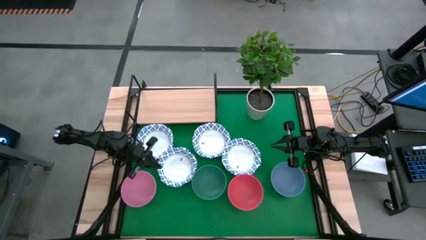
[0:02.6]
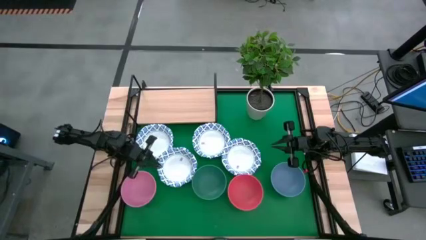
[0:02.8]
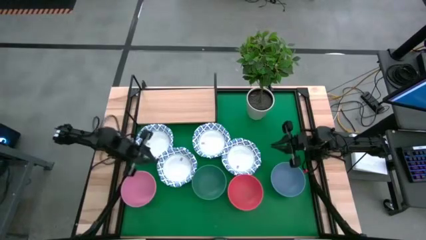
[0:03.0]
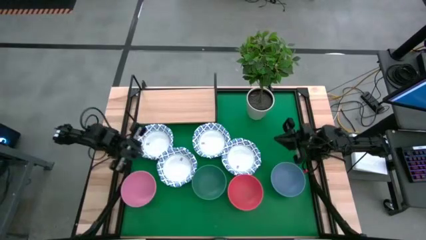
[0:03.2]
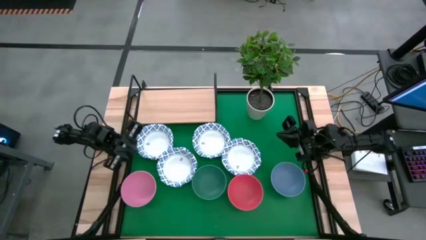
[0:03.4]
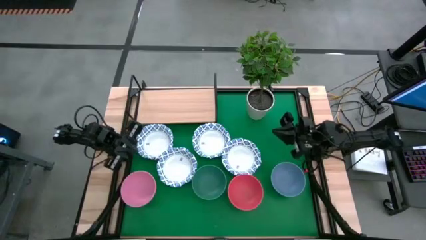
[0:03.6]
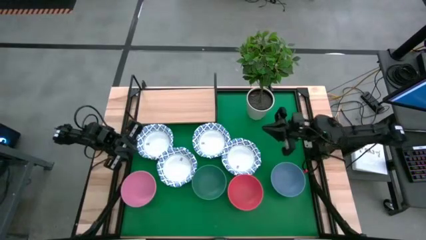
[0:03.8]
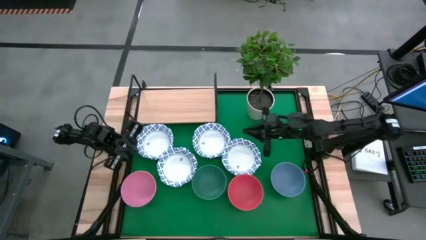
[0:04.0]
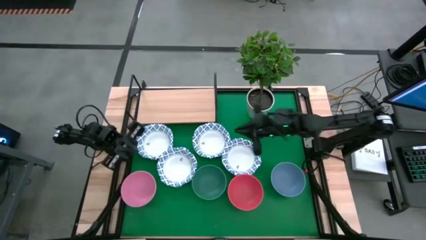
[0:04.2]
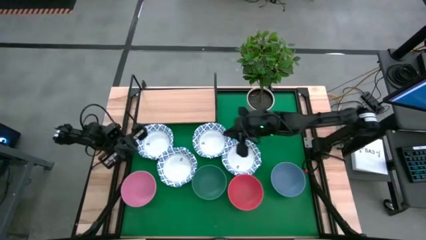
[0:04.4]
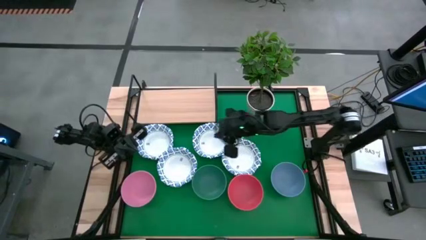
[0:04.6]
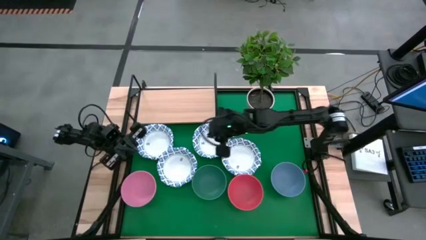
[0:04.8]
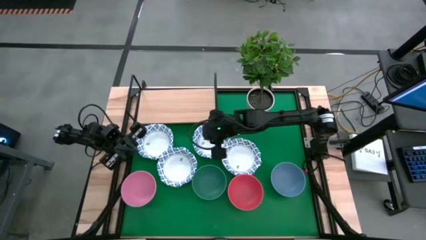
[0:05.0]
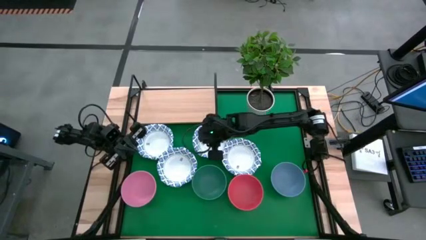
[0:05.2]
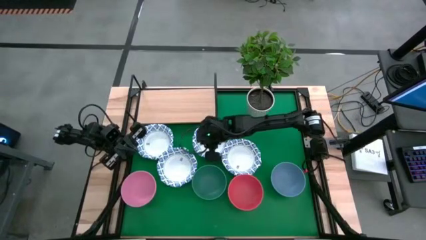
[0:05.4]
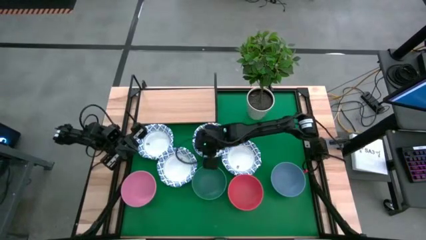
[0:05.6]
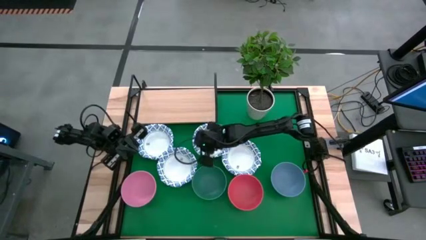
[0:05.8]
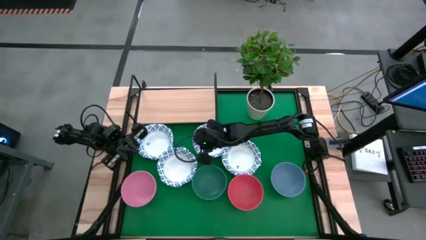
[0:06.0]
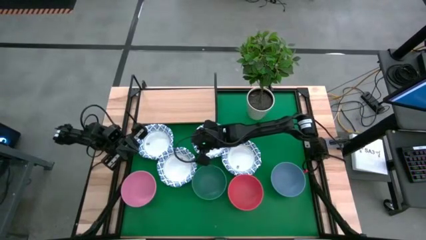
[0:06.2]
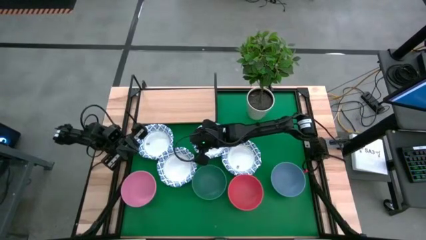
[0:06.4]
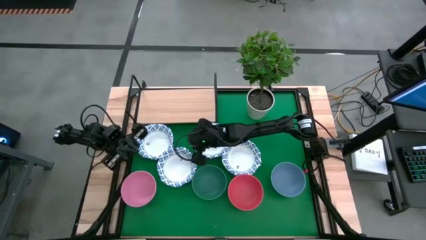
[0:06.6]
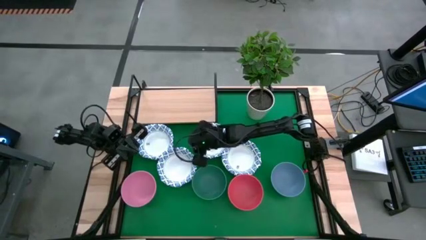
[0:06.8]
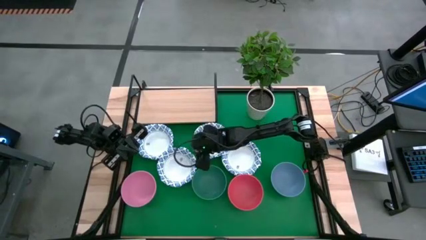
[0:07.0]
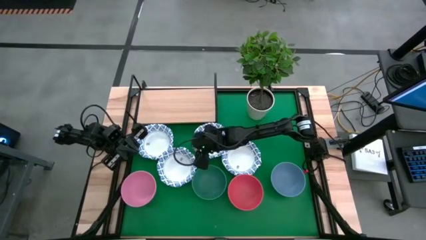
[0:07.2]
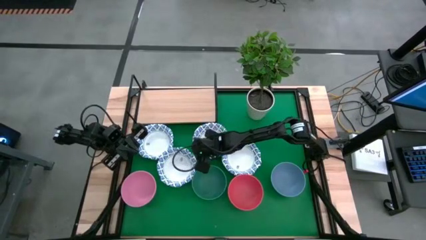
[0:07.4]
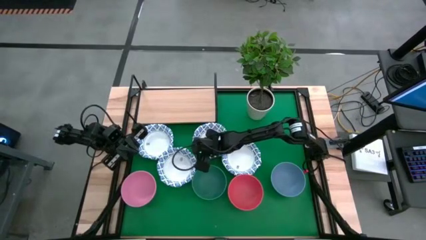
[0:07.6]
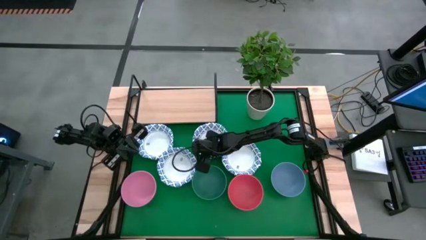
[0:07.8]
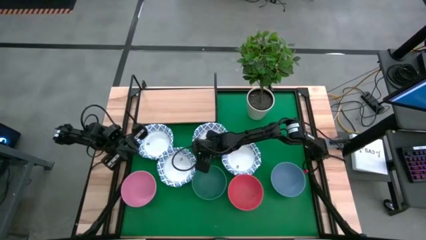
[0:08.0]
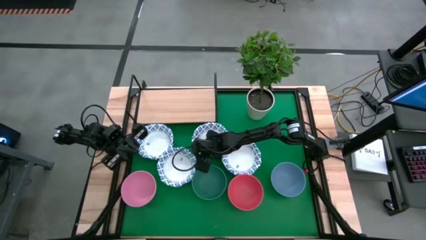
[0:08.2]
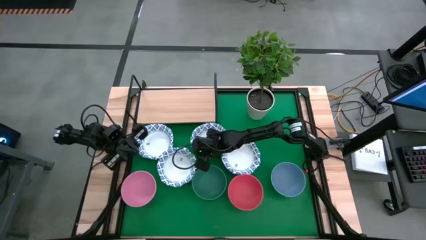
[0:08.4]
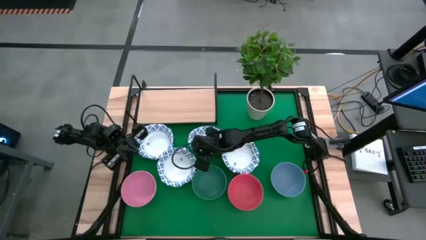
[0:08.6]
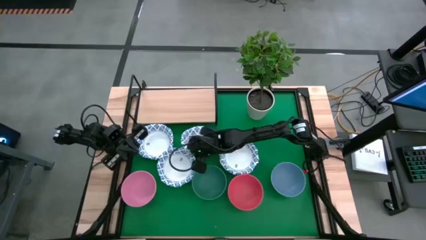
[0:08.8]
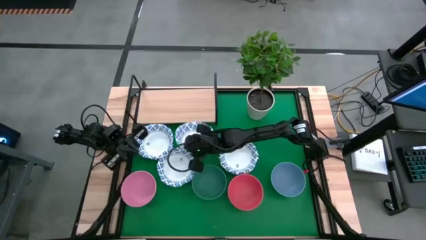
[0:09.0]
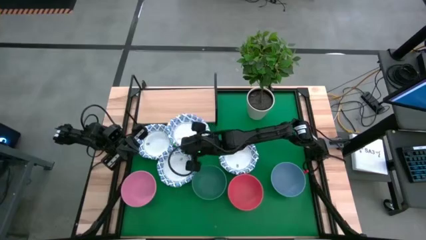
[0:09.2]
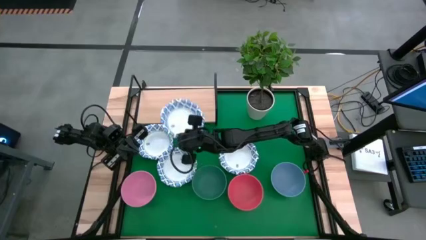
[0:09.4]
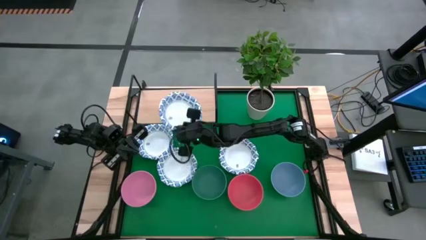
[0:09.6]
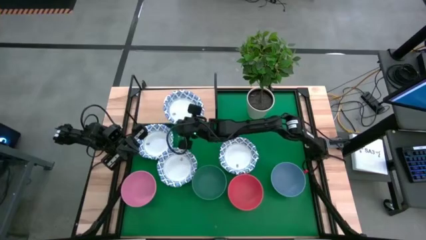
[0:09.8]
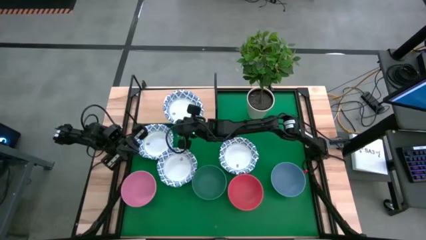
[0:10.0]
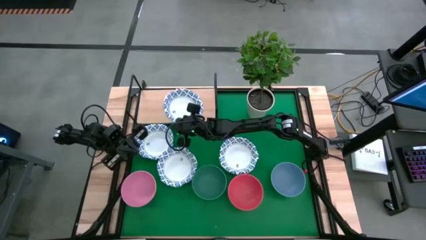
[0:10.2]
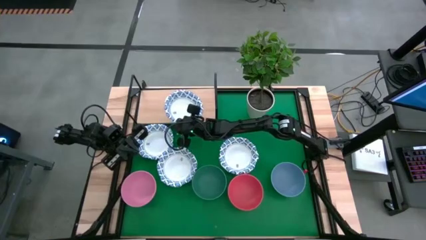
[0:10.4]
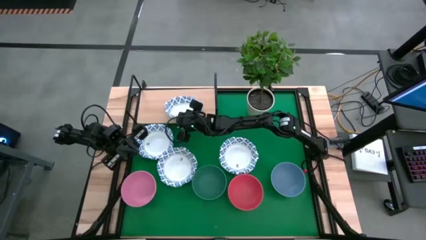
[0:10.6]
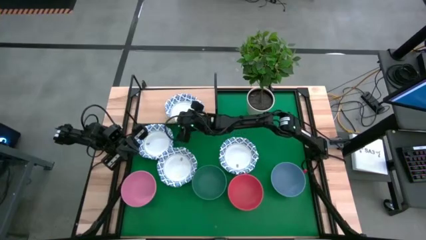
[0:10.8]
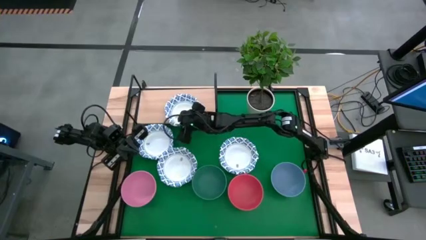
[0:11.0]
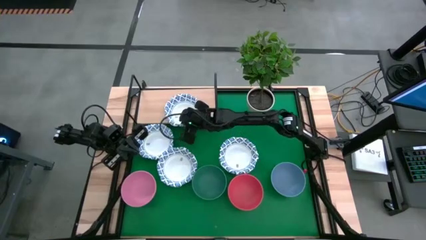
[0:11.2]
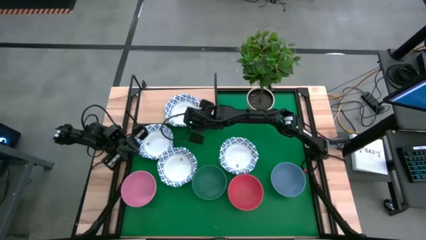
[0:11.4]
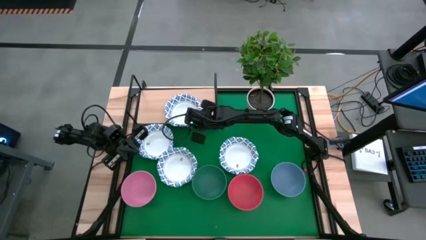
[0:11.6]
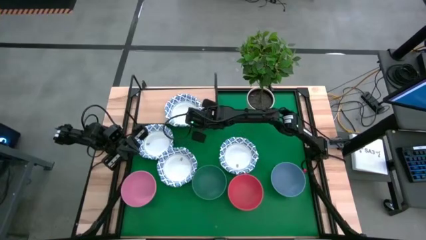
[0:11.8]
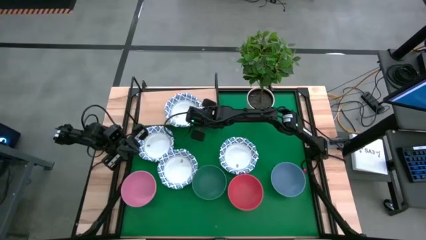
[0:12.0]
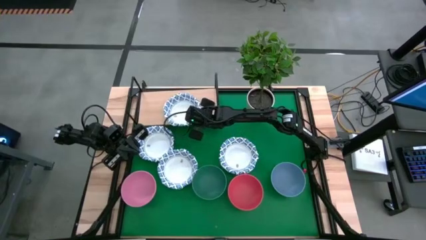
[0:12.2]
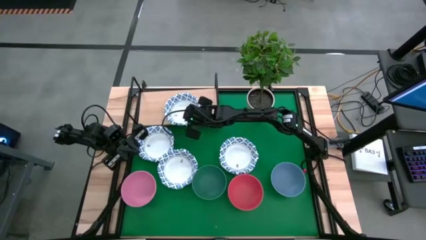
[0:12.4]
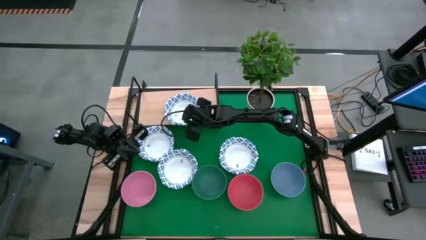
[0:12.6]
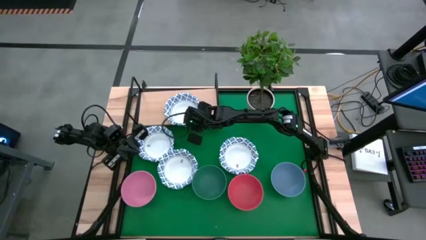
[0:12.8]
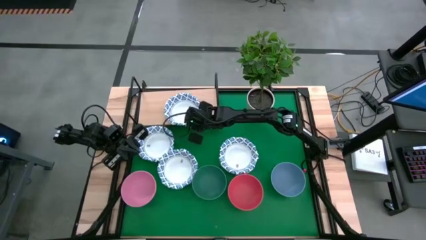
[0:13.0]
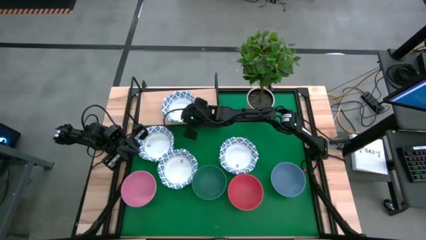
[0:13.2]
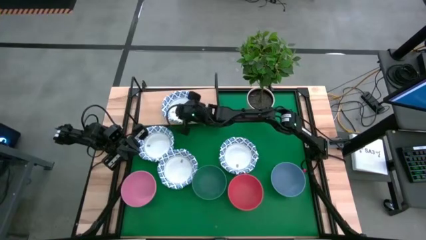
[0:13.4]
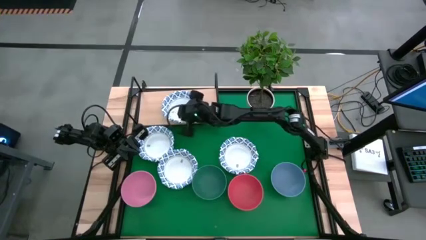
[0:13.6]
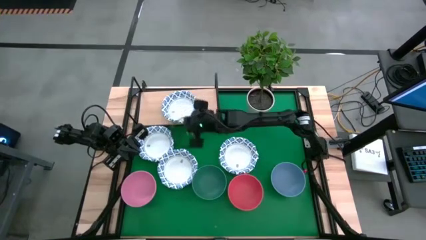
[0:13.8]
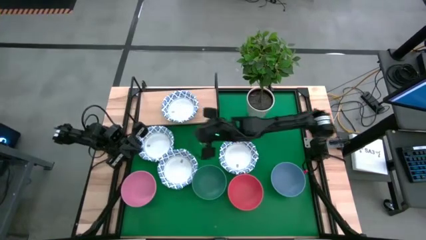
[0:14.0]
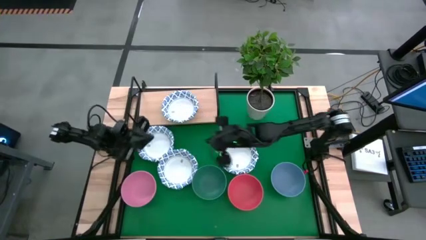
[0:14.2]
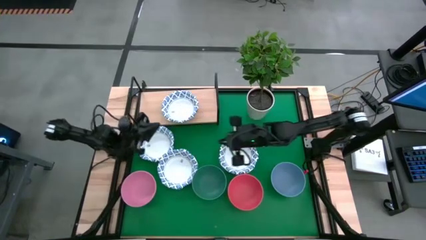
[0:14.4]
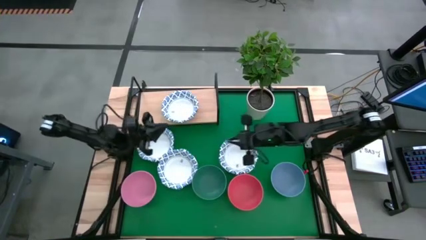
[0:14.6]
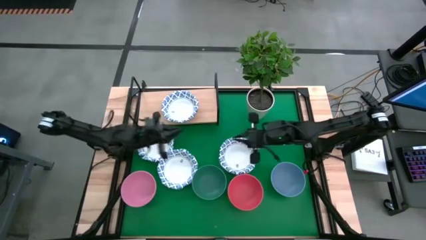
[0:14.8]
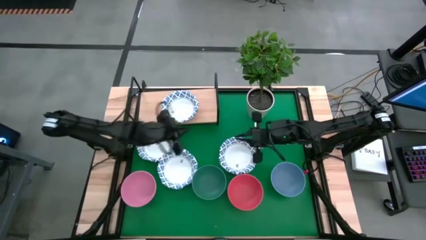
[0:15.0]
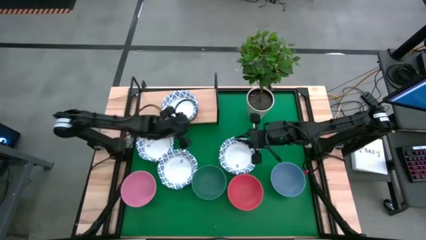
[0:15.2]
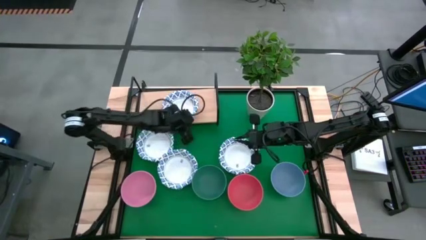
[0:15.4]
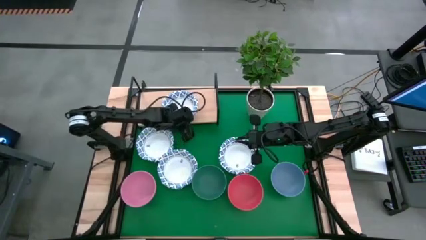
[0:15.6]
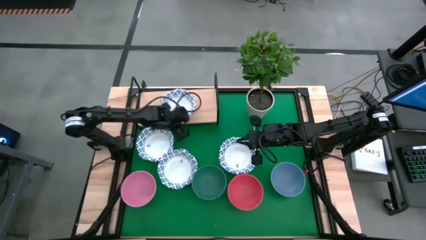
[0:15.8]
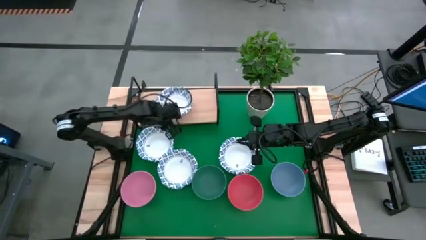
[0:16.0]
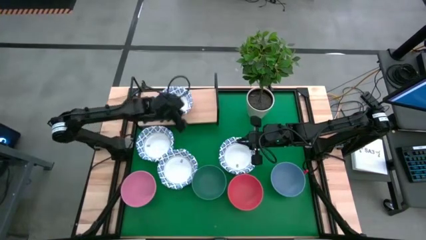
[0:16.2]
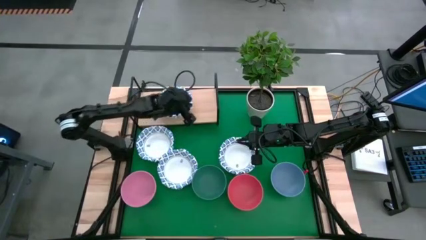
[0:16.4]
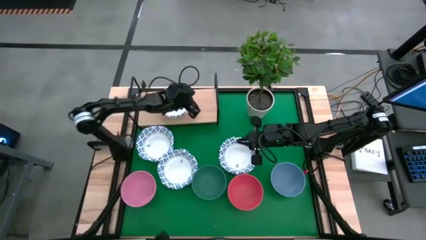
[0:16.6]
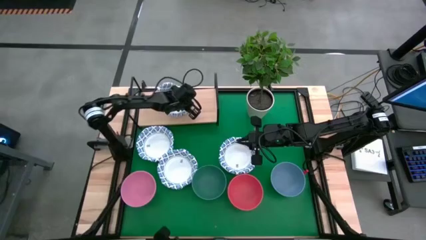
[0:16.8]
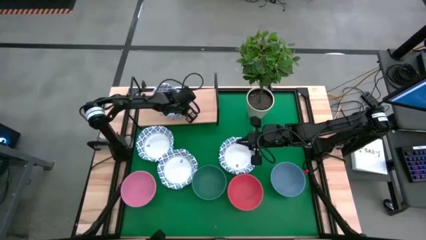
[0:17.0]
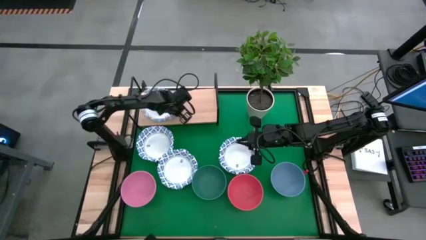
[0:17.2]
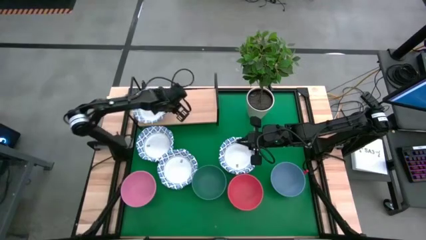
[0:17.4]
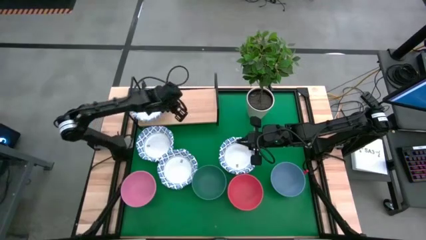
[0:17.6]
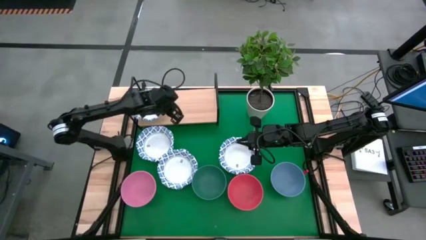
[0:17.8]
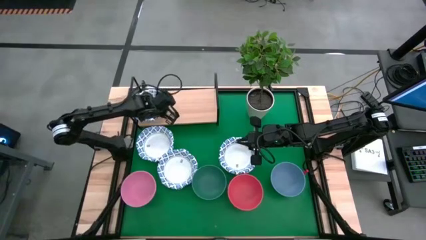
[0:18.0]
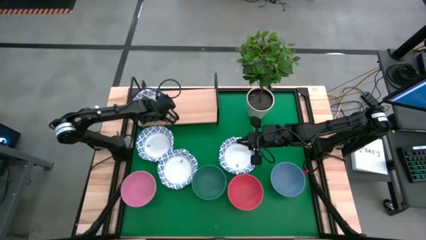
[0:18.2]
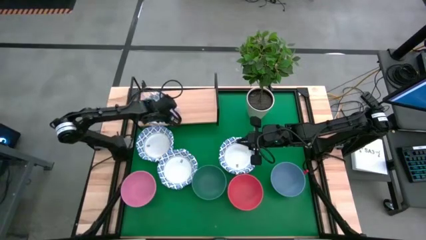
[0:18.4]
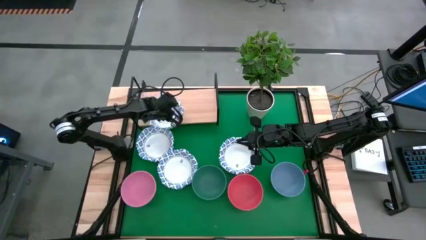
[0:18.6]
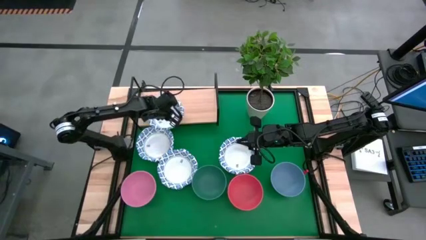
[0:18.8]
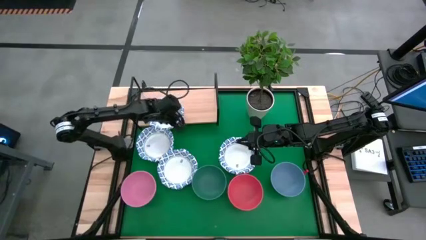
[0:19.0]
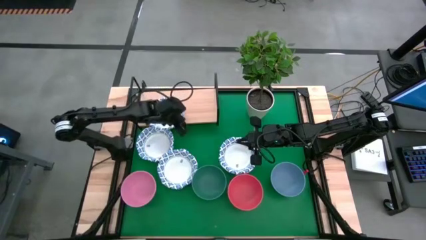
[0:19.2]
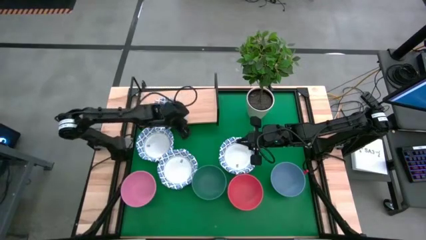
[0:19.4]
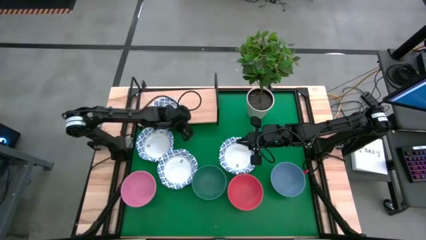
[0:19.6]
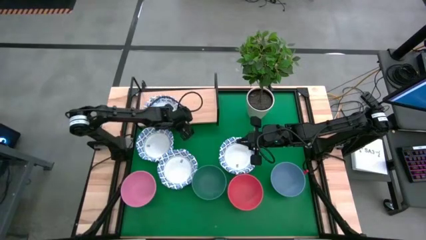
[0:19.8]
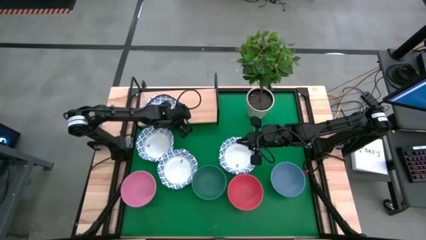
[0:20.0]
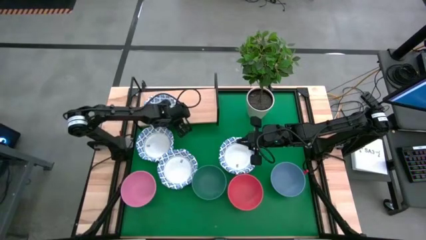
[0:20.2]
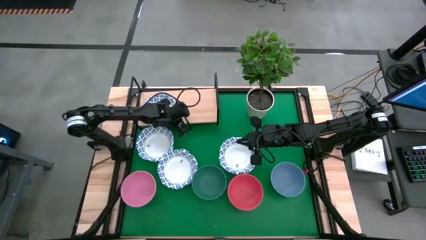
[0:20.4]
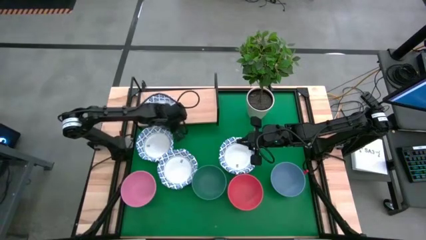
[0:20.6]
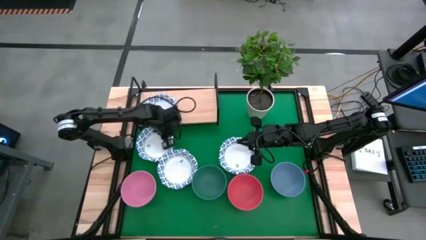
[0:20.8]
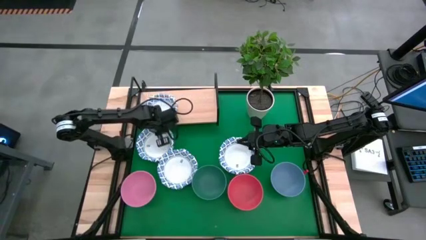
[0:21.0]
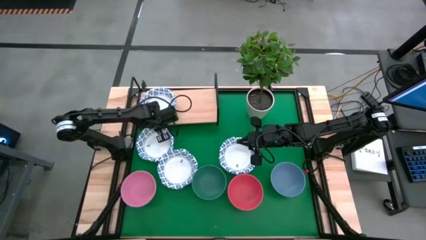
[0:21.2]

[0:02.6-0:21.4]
Task: Place and stack bowls onto a shelf
Put the white and blue bowl on the shelf
